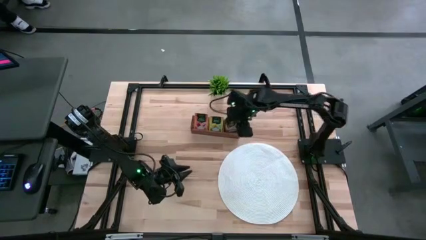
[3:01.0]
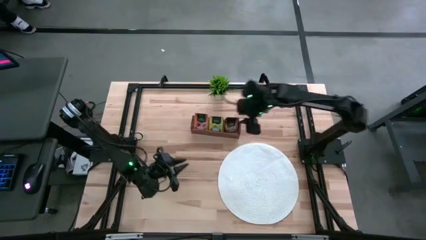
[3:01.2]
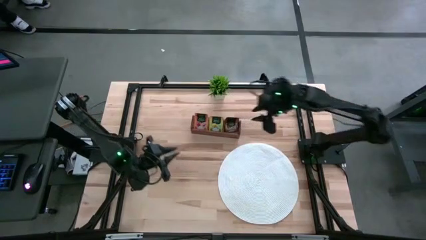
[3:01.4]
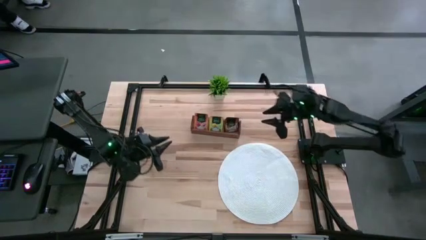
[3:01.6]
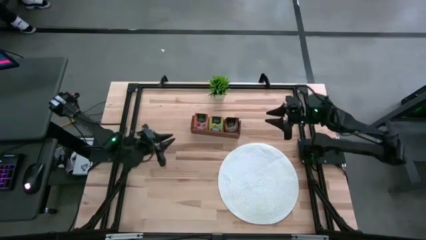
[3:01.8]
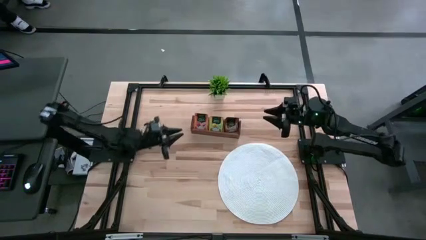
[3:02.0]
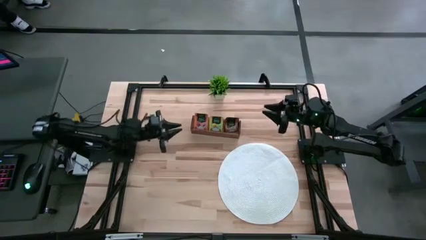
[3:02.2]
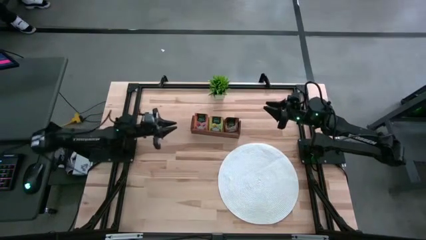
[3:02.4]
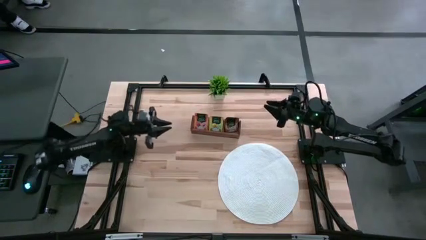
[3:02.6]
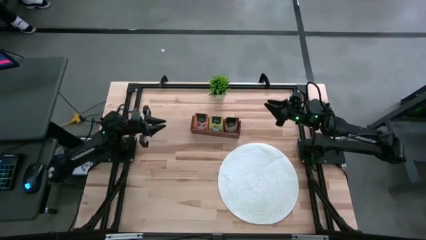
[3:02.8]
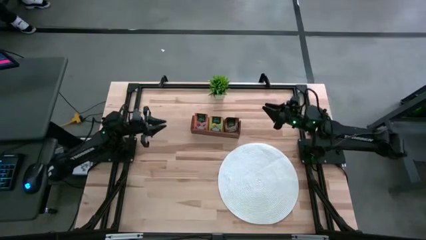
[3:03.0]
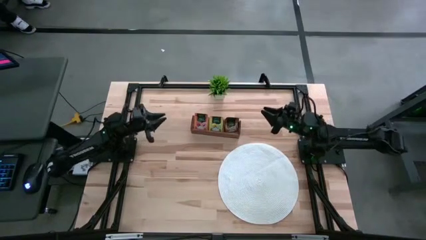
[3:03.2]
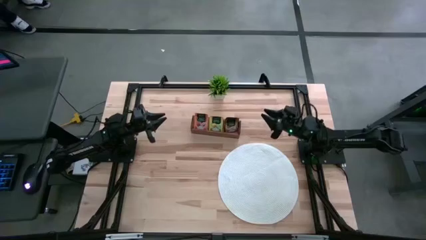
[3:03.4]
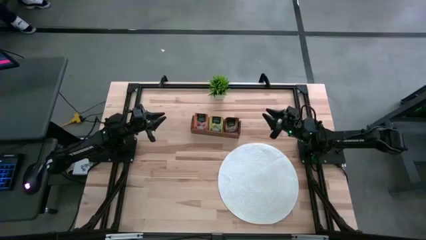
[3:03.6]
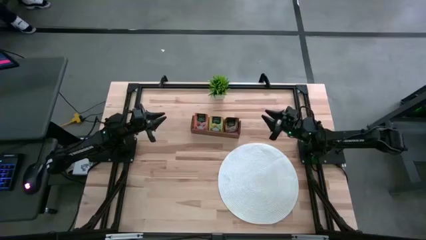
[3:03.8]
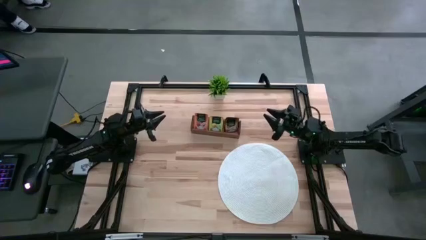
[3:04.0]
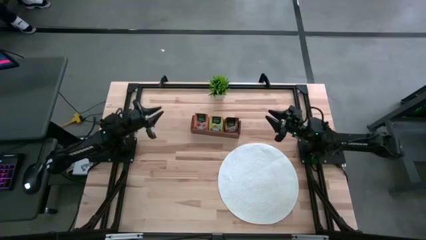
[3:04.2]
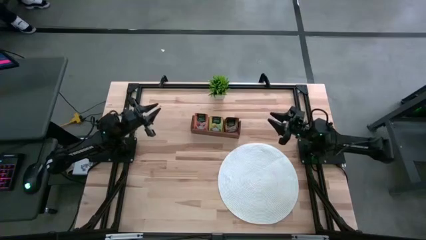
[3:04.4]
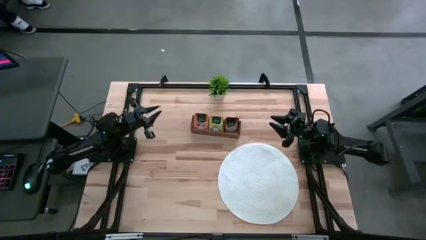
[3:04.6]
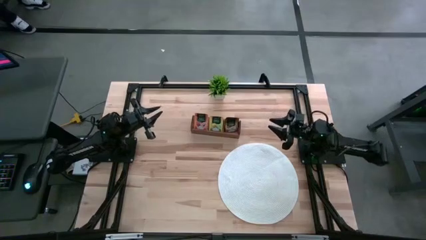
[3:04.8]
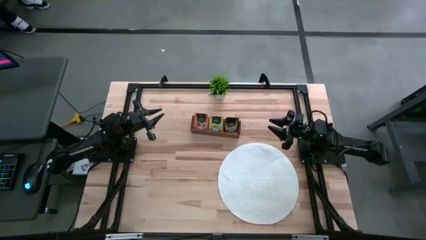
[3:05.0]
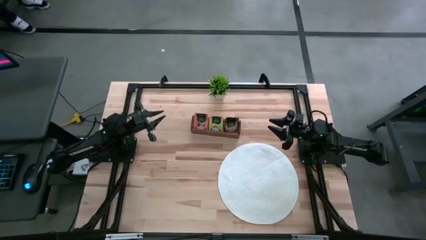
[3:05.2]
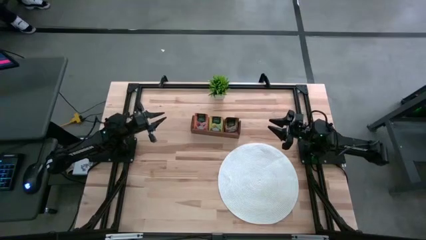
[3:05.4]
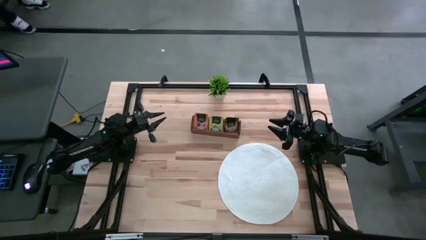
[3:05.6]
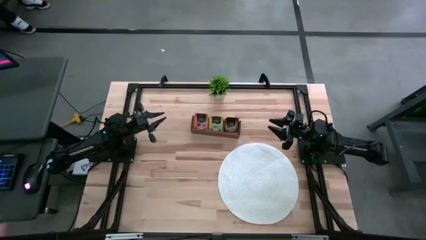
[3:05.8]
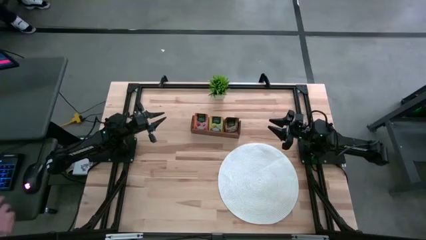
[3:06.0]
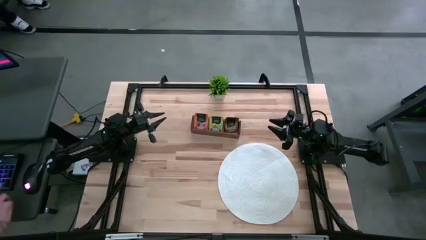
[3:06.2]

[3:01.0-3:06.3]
Task: Pick & Place Tea
Return to Home Position

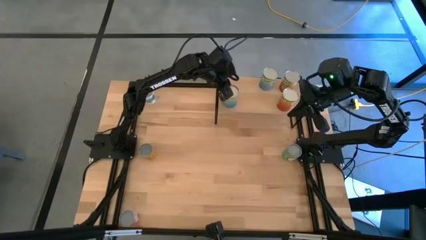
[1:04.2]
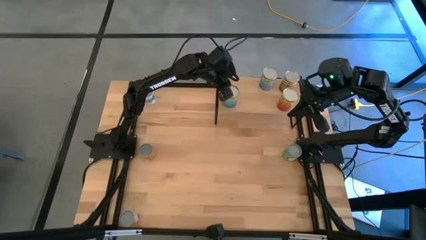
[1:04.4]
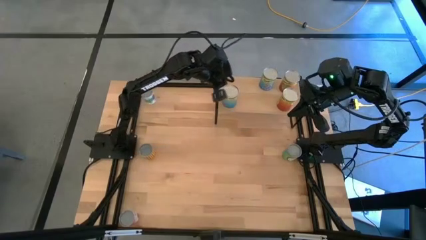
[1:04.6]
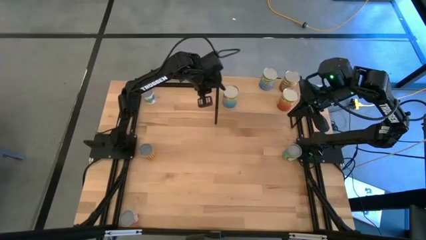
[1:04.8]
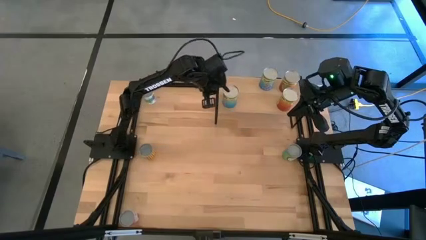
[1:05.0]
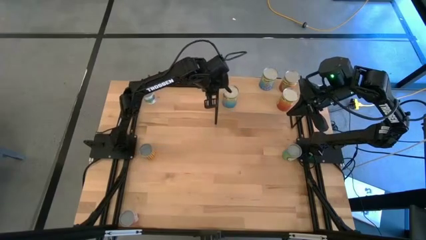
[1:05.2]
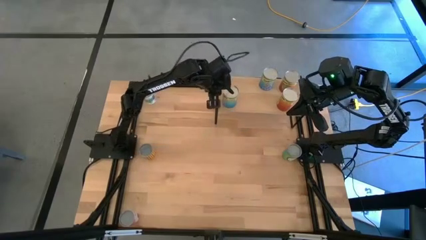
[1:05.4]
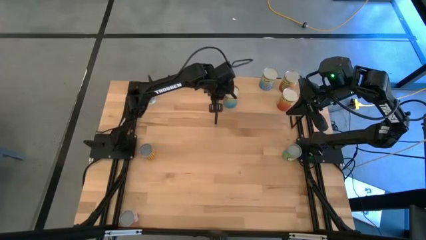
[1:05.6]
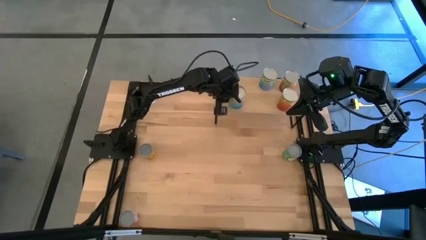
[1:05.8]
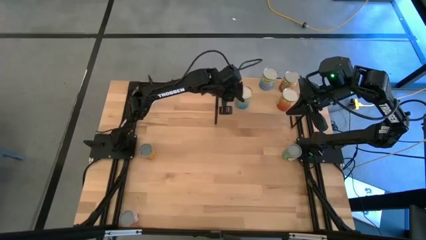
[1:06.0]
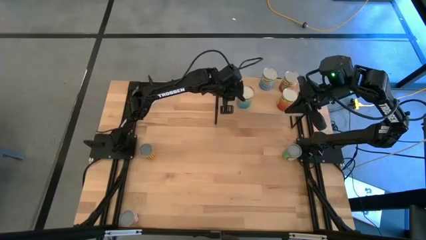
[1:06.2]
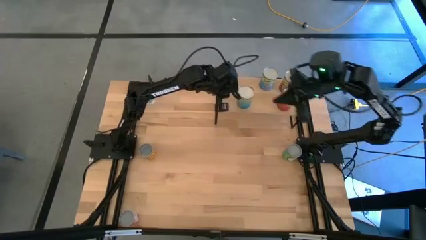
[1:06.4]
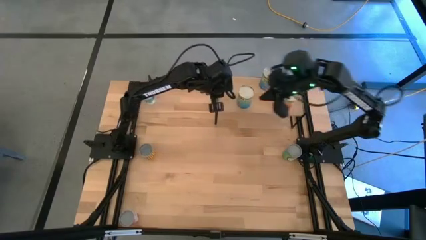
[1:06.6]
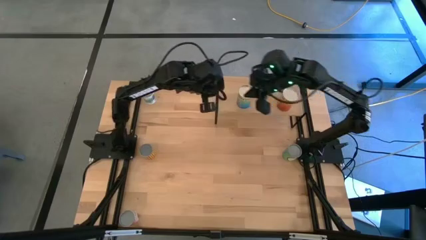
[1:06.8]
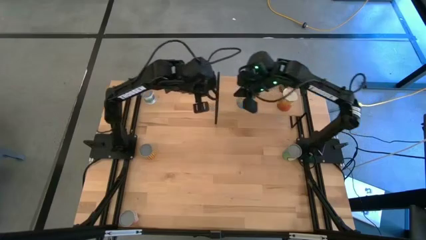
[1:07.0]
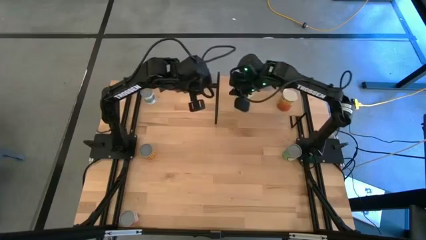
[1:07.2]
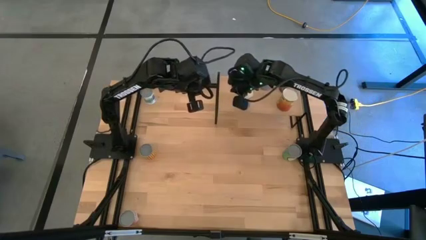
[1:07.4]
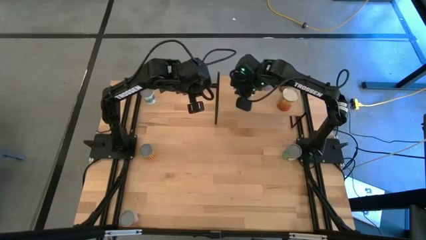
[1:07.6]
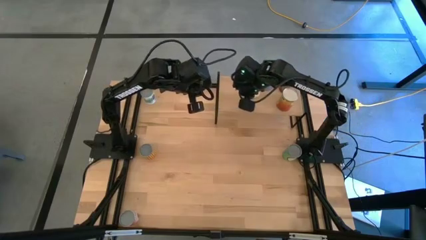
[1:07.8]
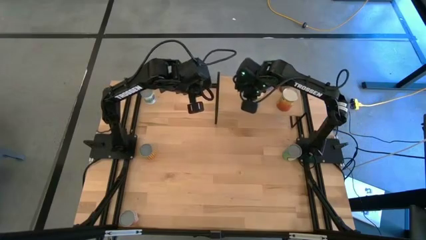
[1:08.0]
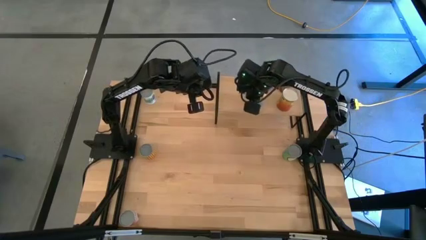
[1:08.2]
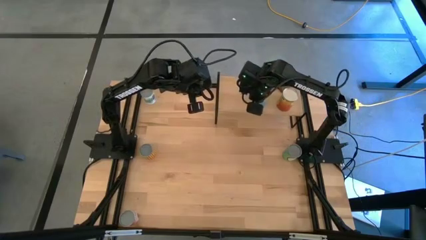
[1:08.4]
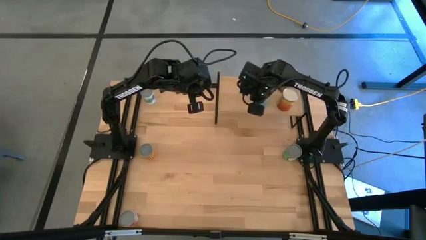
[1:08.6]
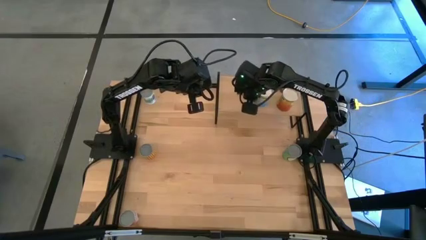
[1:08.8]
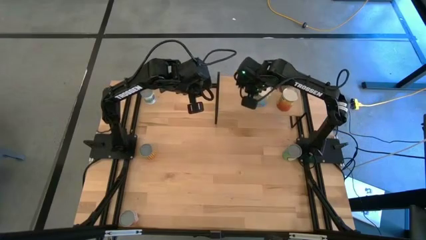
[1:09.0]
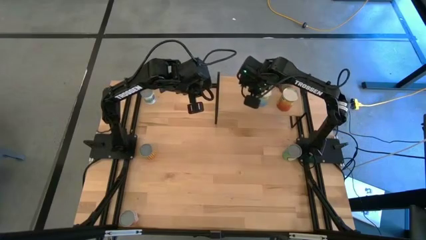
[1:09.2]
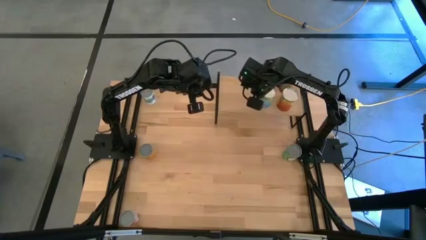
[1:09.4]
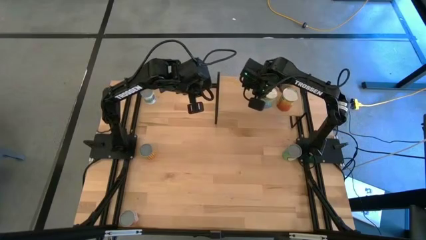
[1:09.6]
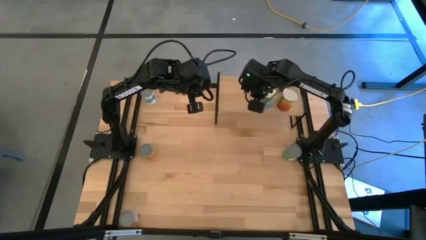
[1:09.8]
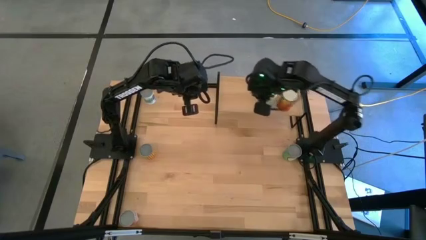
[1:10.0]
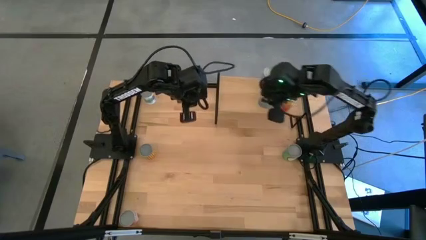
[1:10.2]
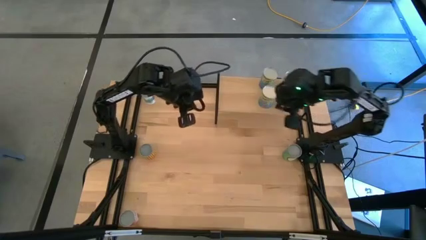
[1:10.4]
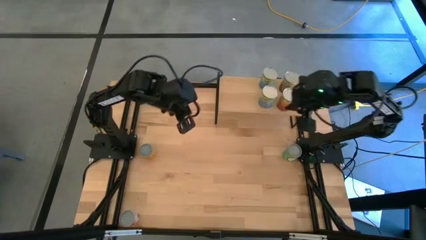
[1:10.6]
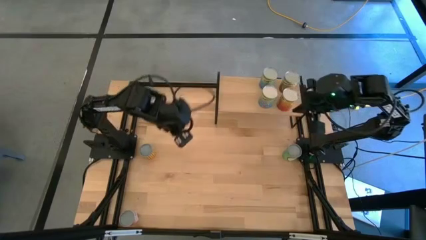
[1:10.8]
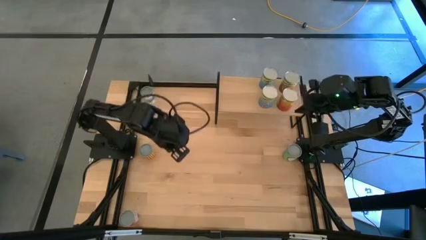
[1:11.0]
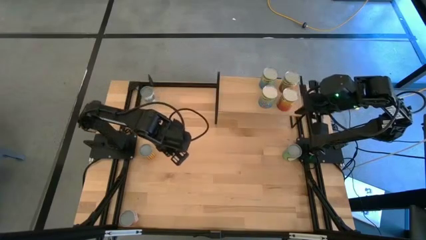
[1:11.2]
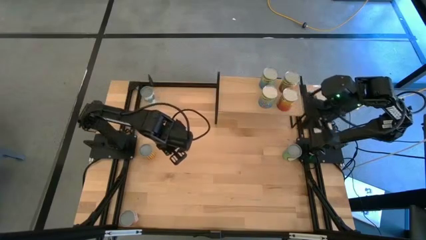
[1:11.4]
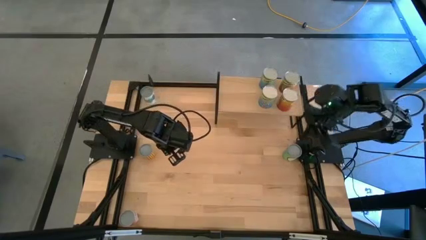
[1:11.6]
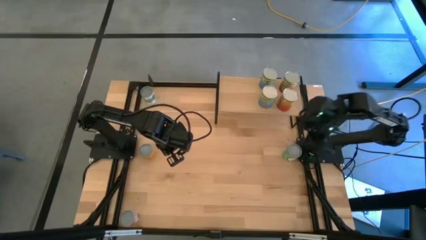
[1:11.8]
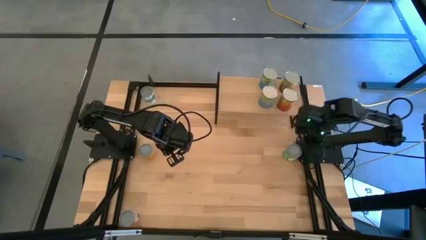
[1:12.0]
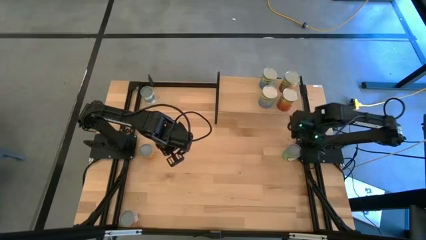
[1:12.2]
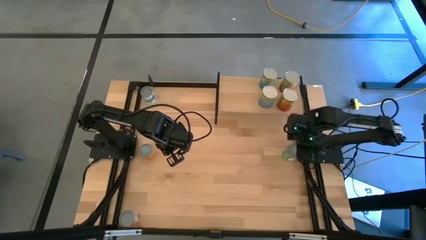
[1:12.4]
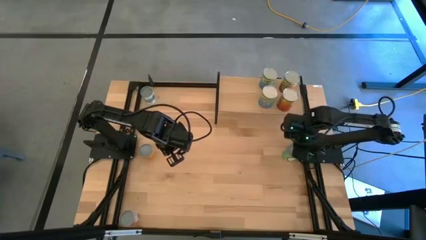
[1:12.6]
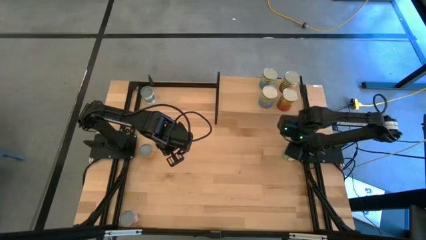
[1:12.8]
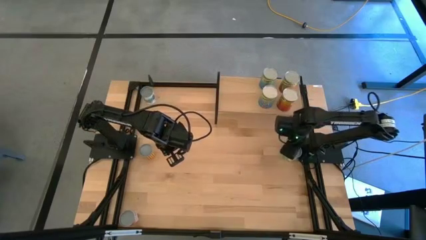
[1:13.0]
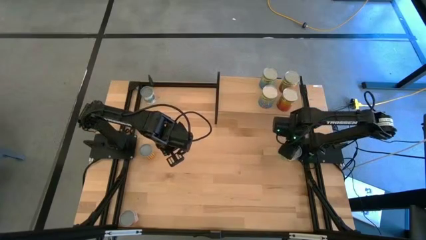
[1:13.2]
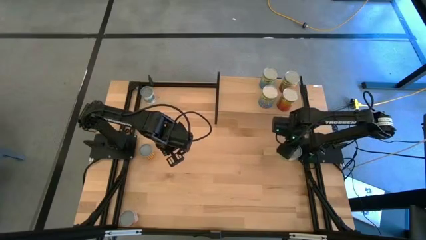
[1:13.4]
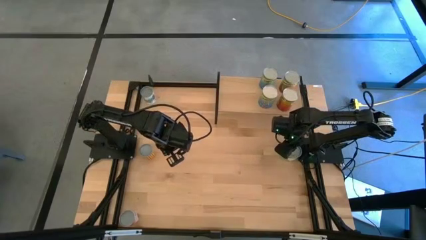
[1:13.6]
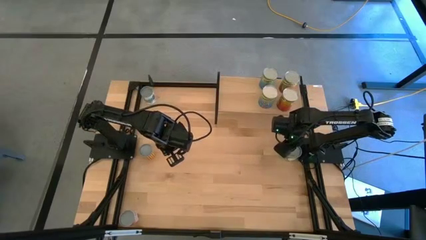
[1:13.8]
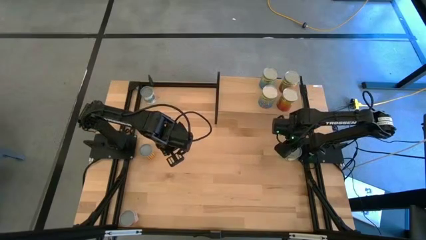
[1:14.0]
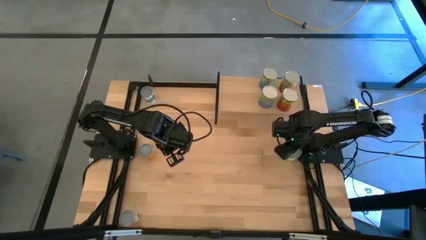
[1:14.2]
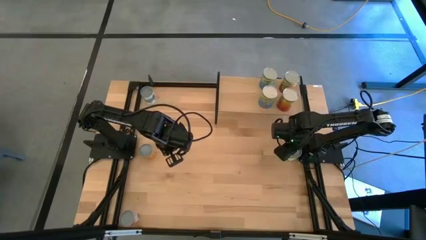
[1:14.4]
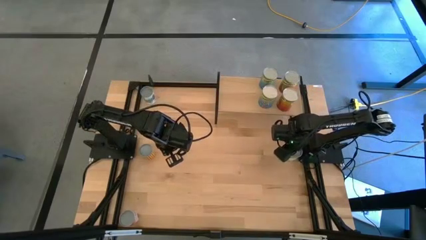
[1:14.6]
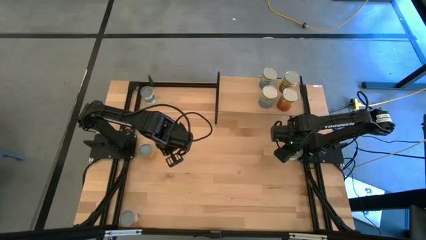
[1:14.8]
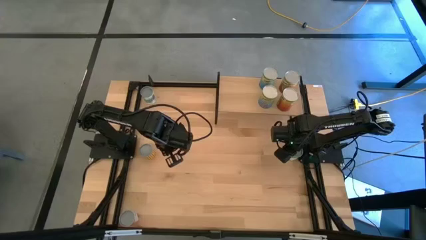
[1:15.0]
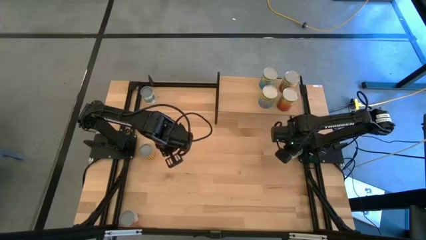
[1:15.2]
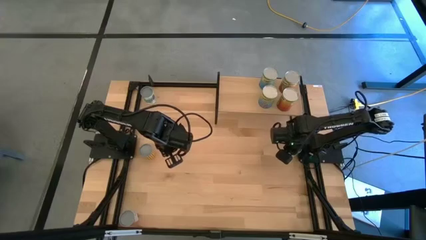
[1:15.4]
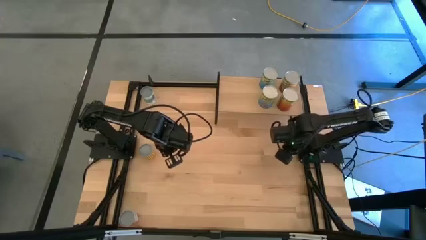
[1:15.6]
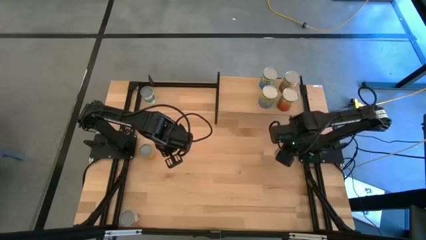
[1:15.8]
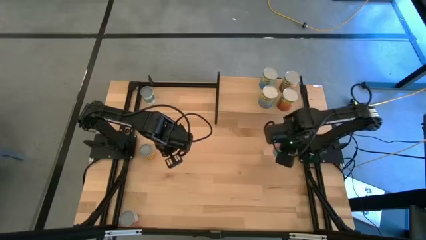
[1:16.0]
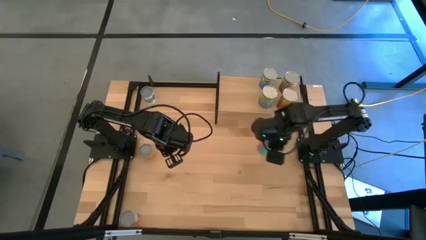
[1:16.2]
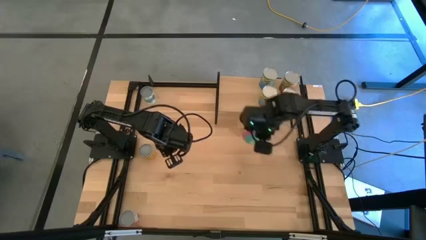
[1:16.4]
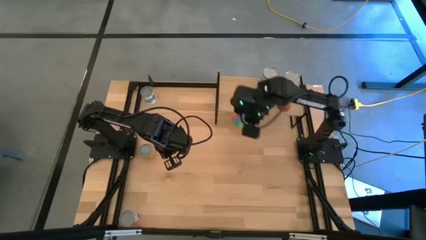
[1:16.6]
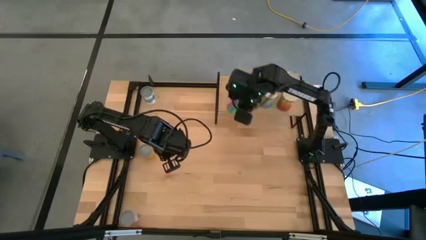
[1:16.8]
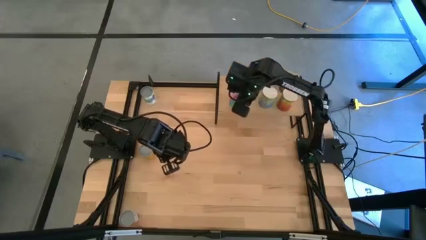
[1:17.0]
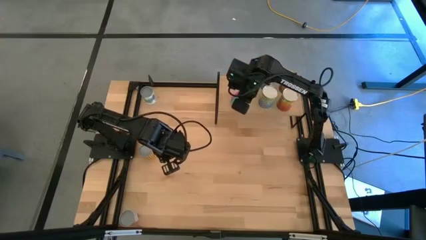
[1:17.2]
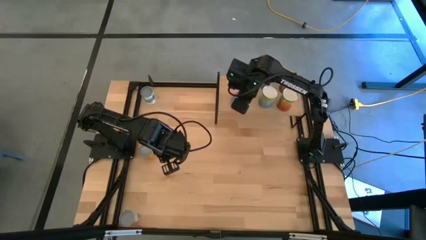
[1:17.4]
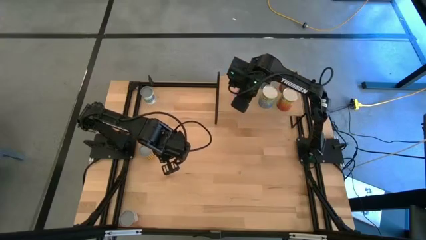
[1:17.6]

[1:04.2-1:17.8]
Task: Pick and place cans onto a shelf
Put the pink canned good on the shelf
